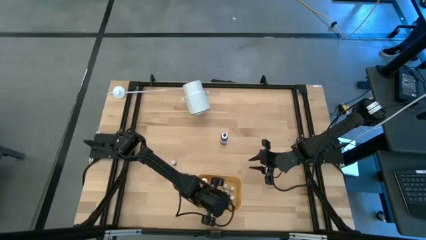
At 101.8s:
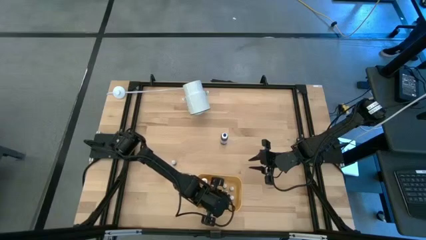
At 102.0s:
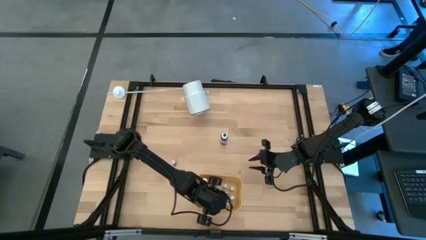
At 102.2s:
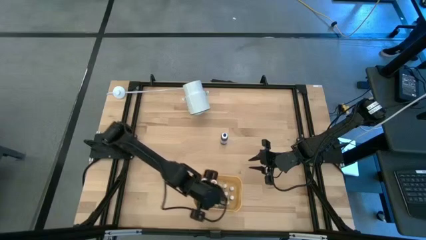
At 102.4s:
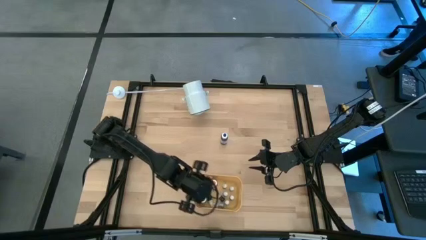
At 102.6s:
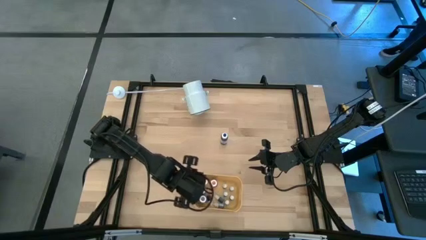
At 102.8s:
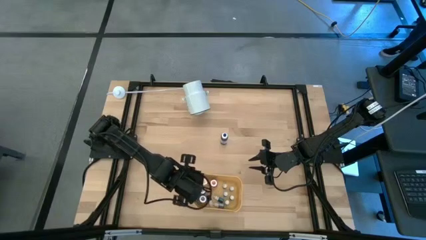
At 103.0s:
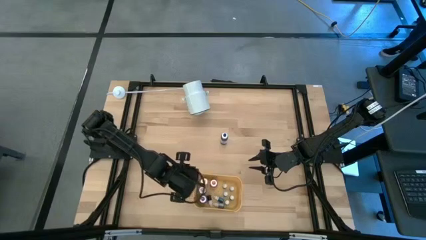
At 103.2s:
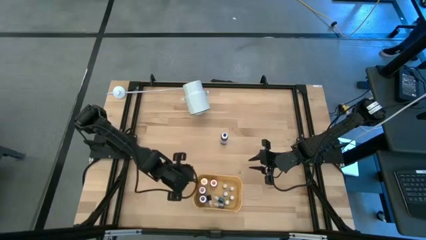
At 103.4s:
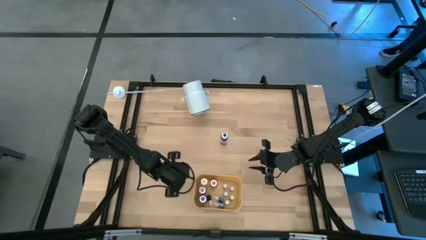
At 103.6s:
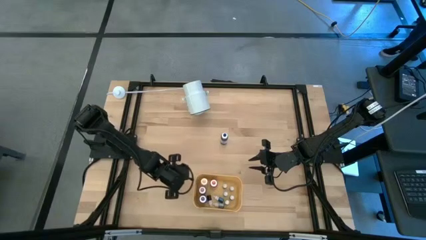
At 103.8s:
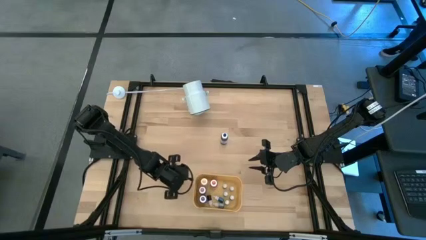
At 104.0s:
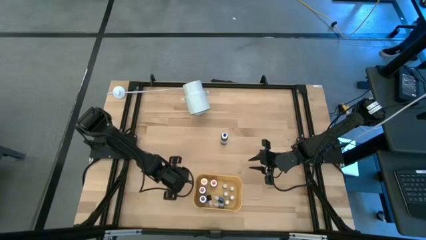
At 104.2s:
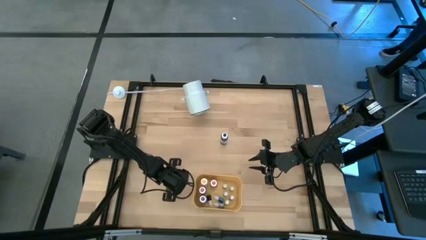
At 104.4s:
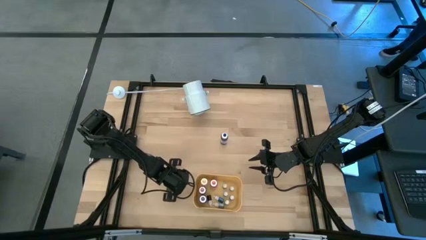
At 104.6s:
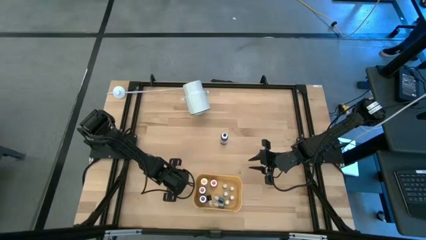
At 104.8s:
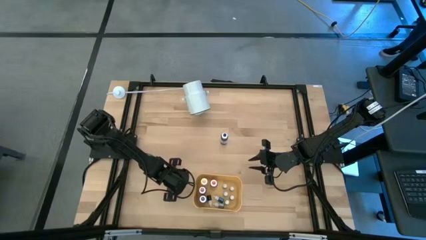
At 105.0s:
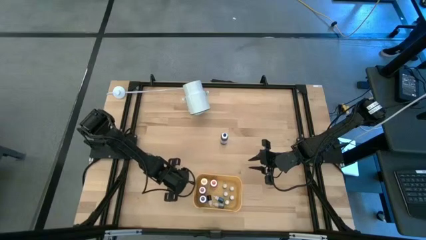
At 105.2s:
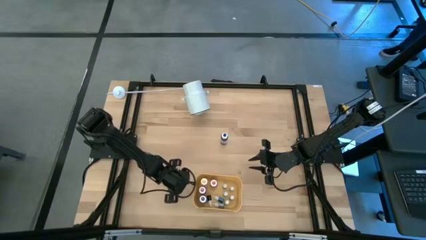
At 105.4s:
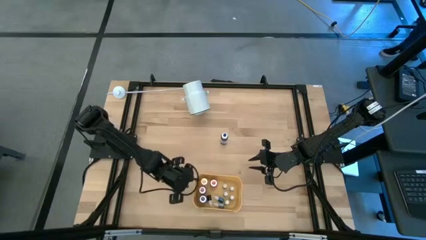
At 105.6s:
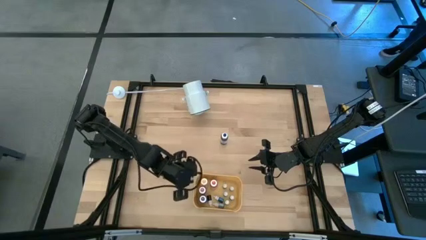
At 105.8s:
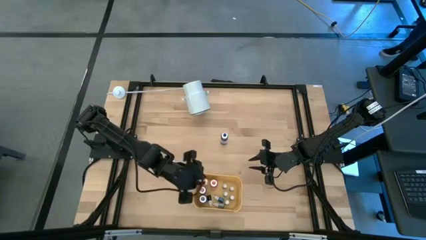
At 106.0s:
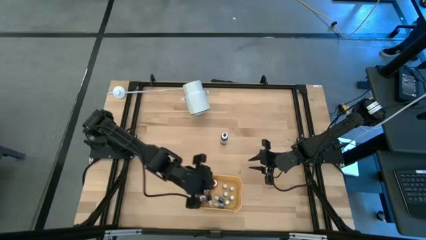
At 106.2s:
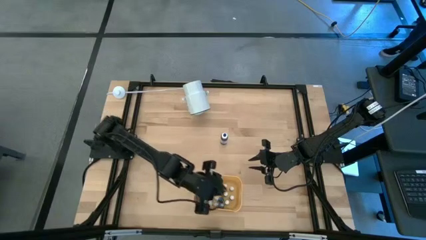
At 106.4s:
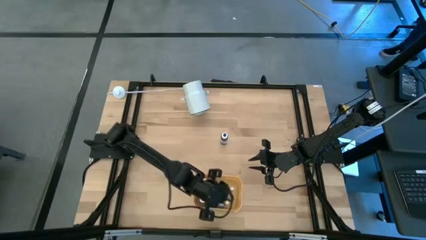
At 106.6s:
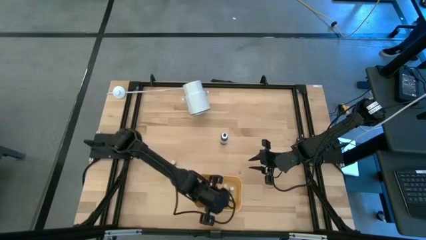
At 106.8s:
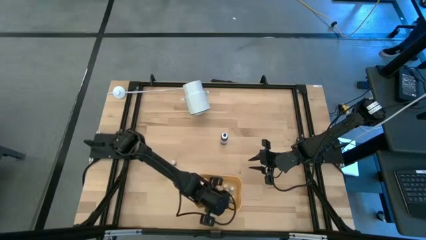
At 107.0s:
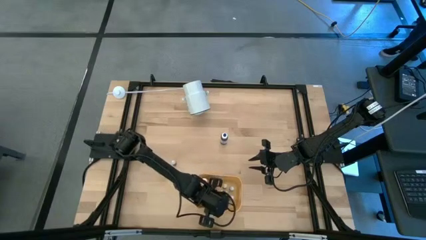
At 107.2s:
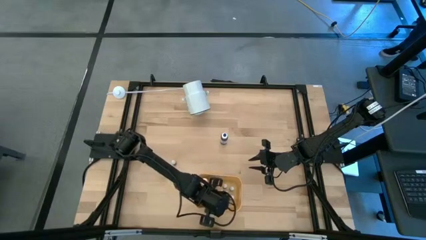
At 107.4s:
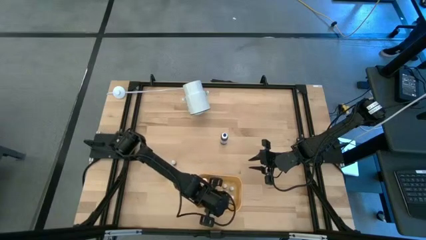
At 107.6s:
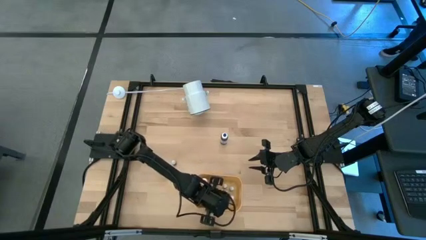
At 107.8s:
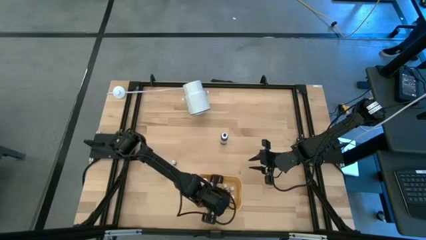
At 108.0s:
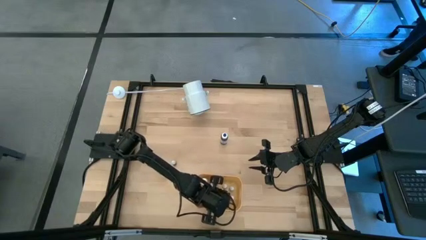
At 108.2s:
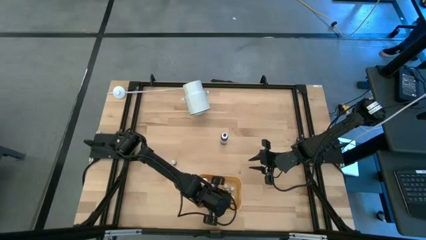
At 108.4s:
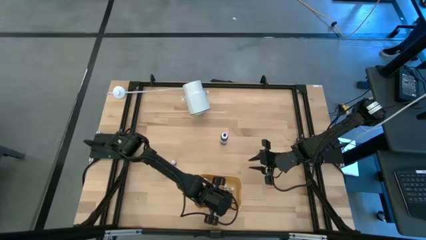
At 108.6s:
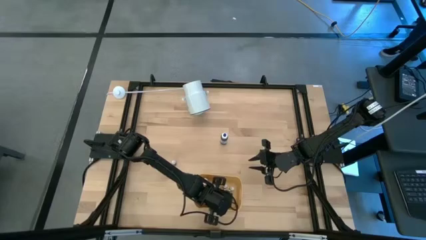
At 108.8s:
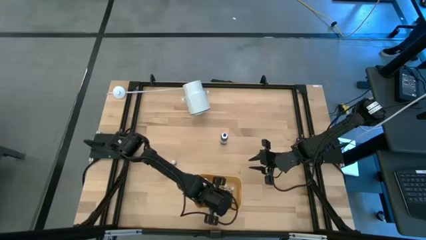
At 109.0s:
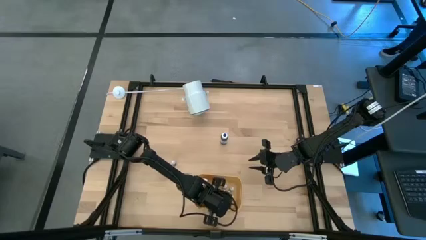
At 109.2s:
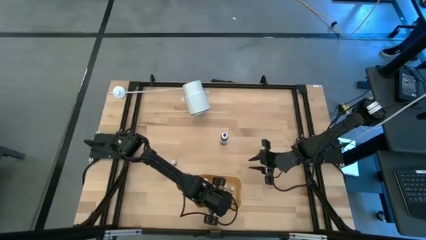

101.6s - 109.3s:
Task: Pick & Place food coloring
Put the small purple food coloring bottle into the yellow bin

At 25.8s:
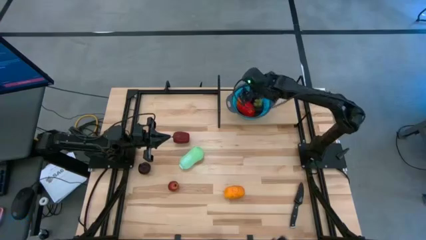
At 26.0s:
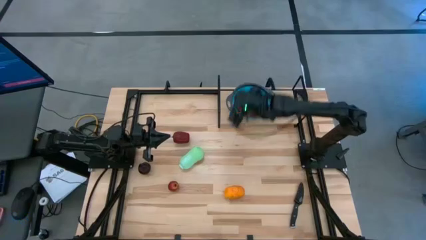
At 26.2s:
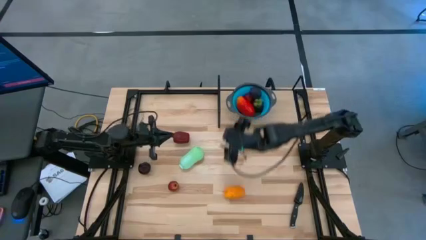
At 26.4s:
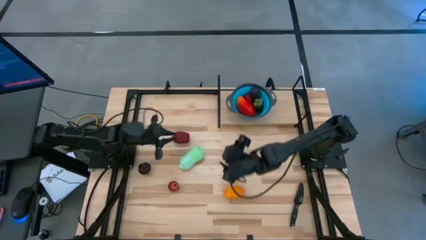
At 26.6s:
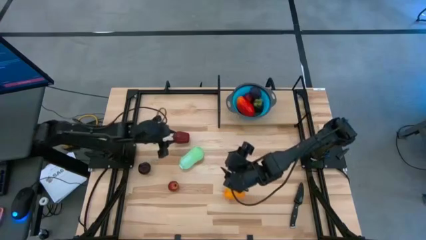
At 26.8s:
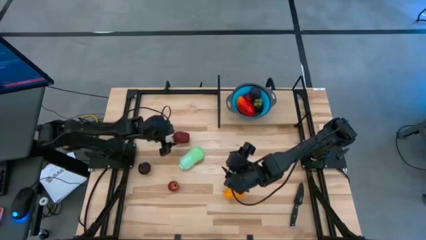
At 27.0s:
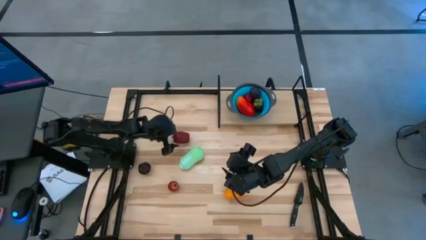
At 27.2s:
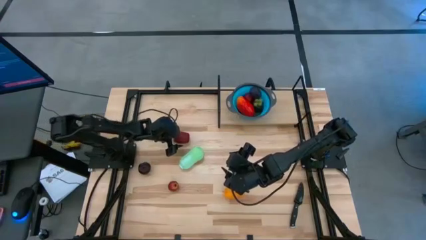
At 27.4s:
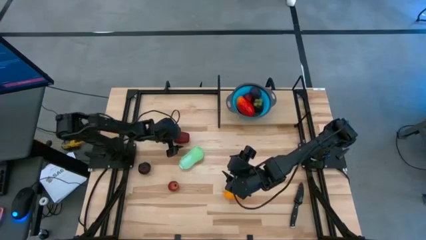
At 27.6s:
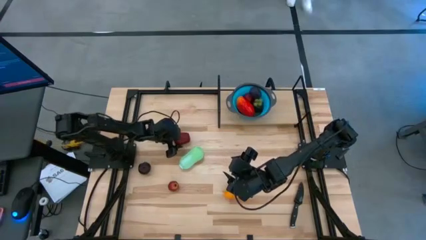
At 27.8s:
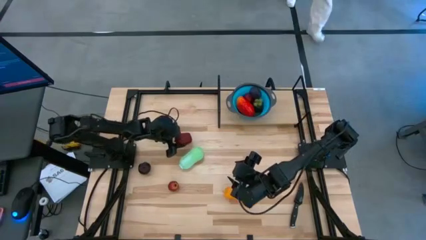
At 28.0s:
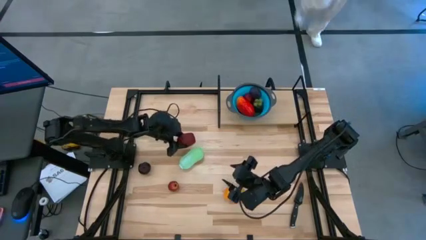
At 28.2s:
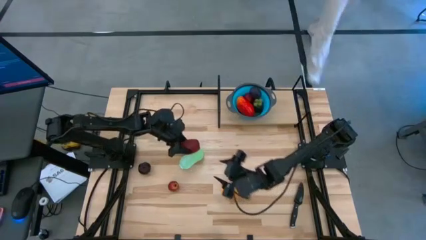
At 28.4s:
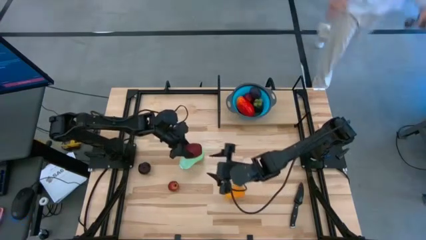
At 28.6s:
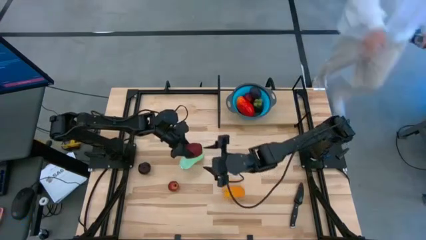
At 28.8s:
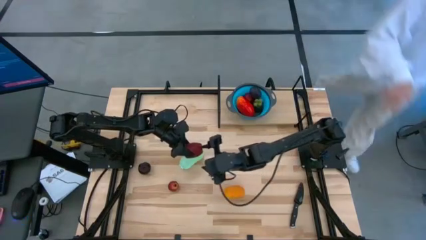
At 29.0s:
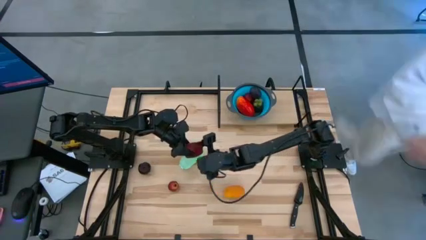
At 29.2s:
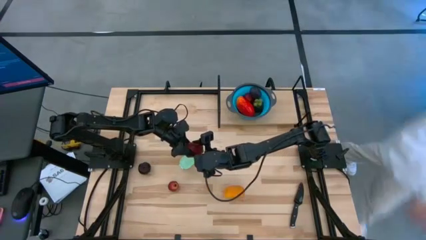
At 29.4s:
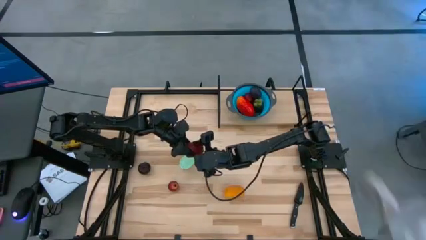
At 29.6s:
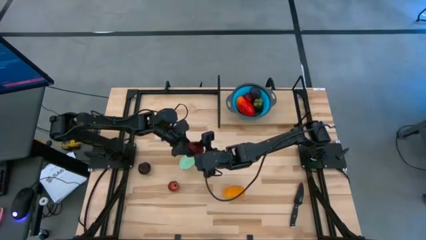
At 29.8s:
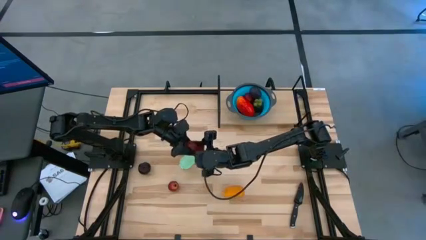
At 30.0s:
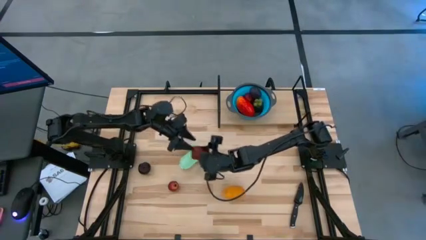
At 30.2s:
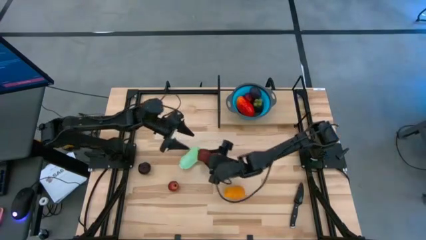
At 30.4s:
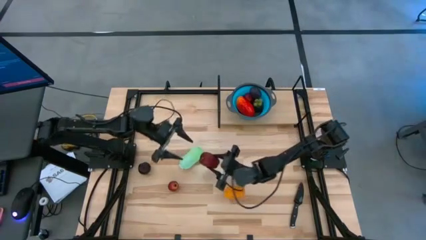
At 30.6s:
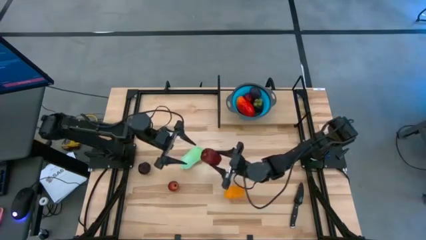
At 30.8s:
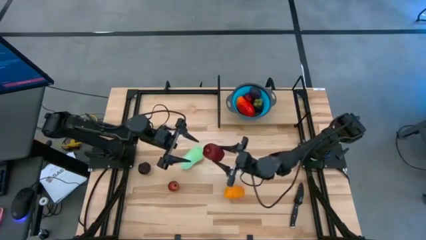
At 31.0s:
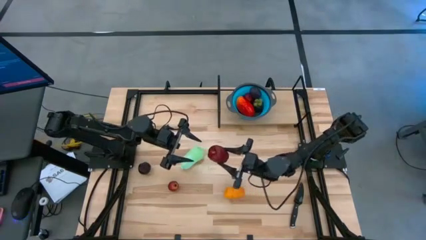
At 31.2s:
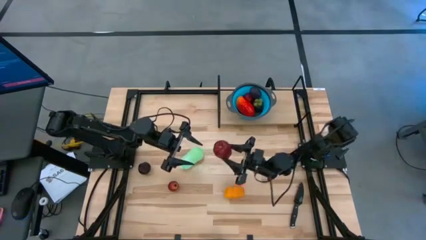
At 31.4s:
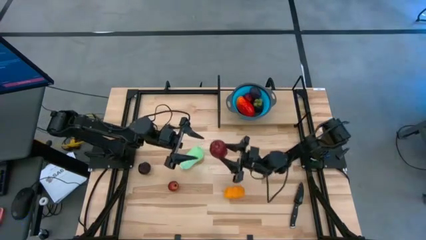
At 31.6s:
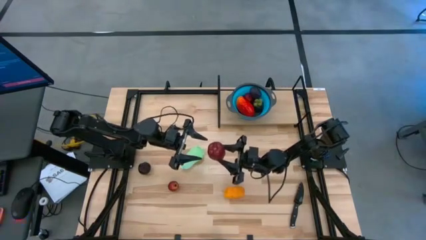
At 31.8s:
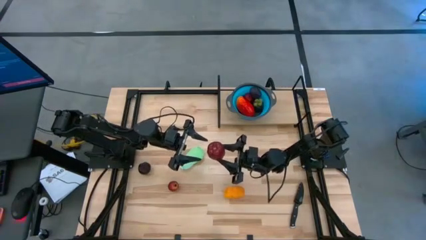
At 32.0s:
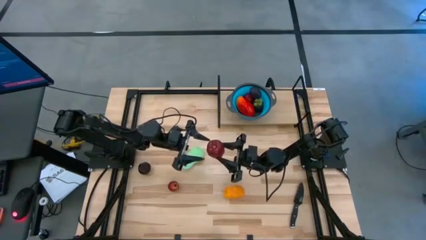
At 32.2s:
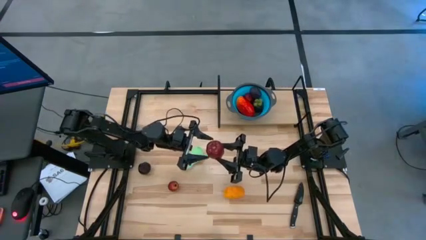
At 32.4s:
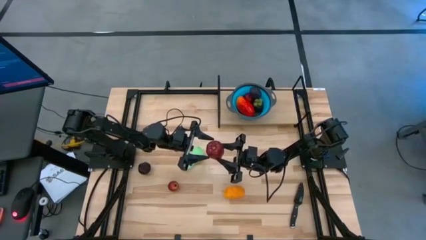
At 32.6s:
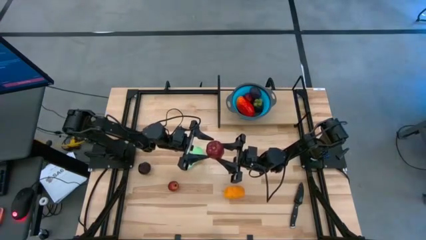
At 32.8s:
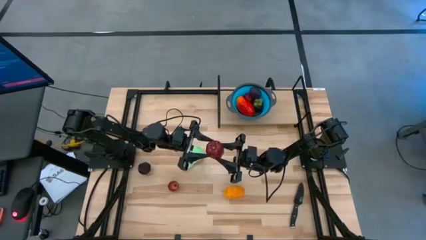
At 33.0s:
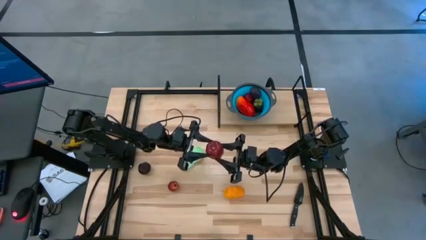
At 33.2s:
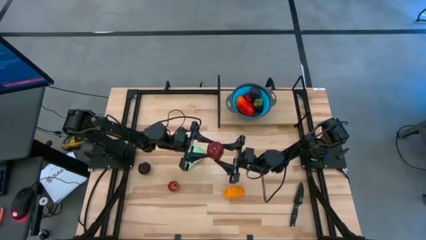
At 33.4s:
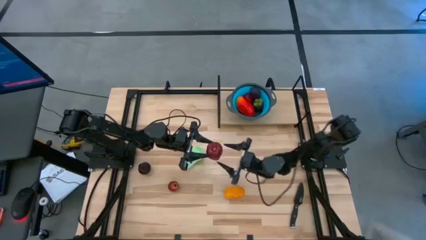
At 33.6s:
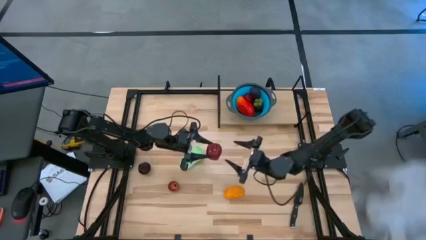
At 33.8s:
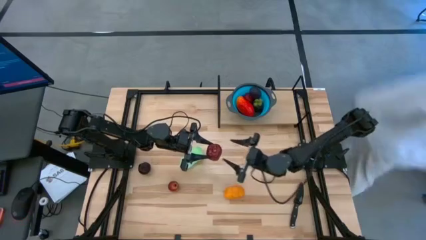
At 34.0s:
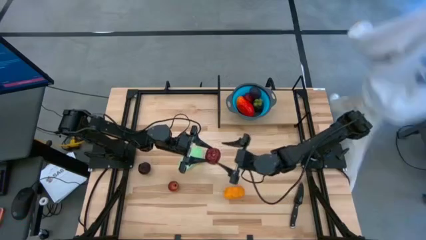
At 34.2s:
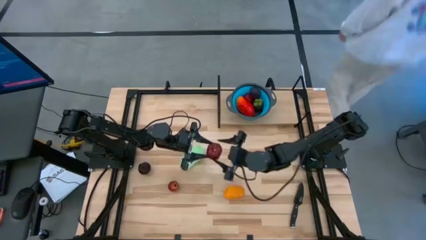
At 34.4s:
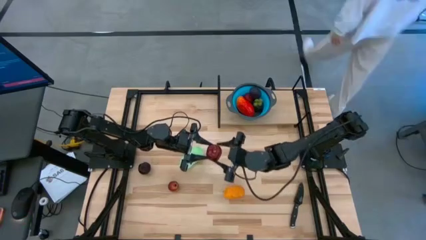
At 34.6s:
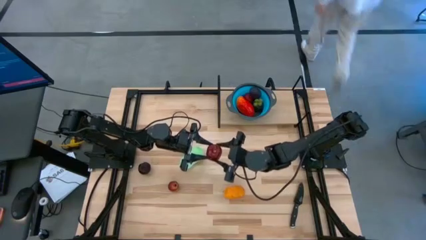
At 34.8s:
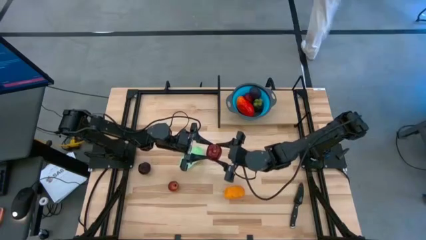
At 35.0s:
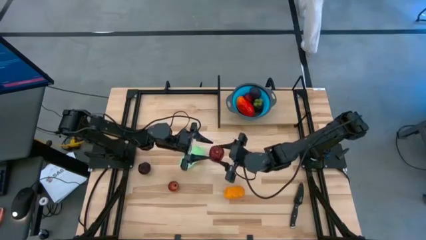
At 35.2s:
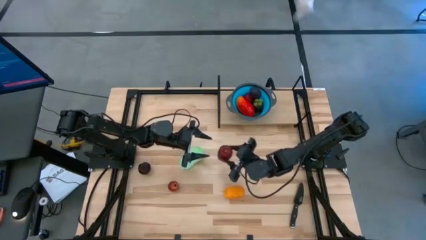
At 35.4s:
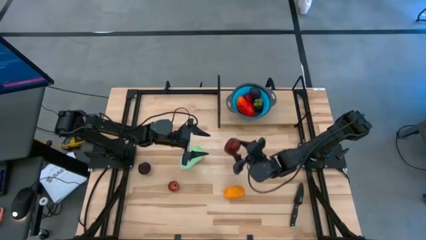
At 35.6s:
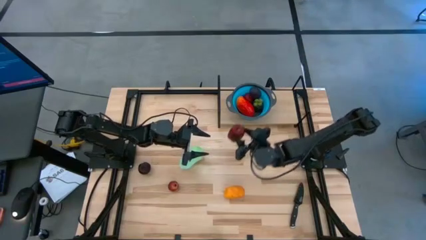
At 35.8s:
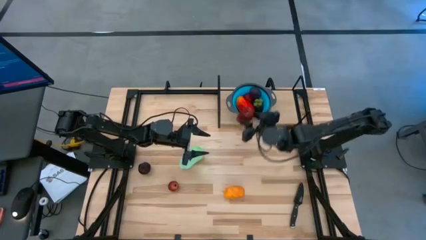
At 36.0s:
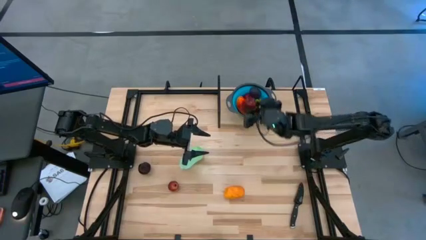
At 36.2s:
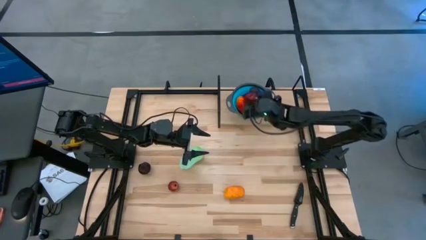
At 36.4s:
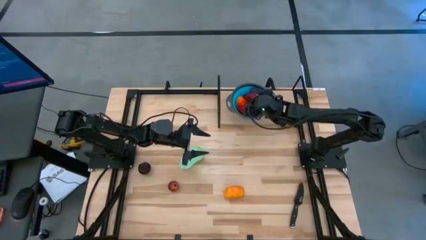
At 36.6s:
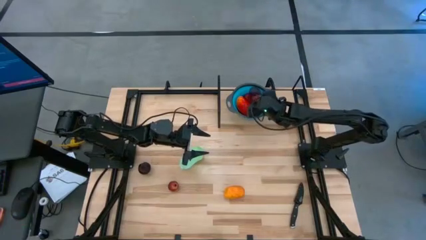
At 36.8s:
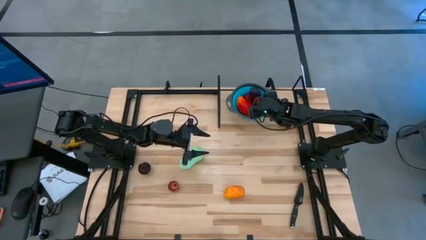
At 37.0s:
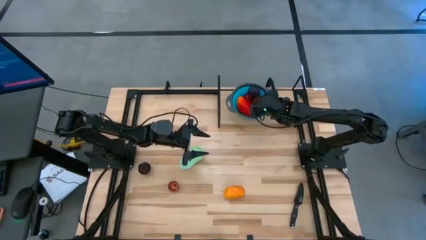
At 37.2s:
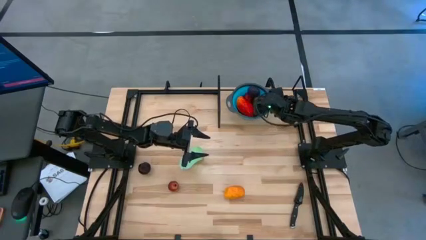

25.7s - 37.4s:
Task: Pick & Place Fruit
Put the red apple into the blue strainer bowl on the shelf
